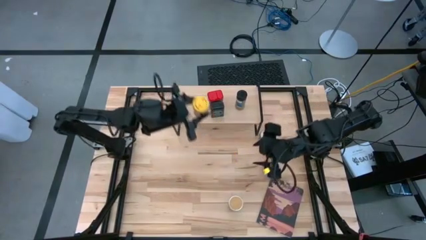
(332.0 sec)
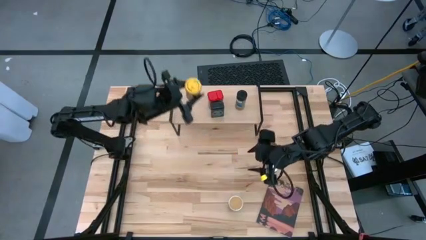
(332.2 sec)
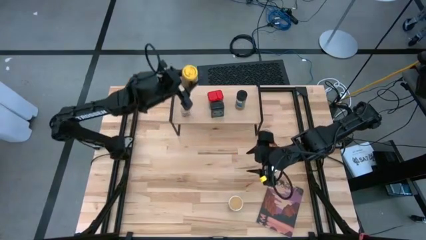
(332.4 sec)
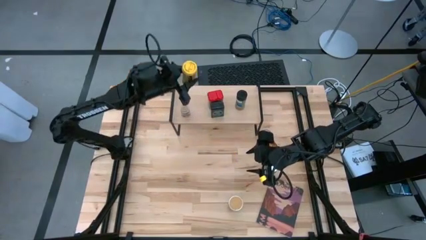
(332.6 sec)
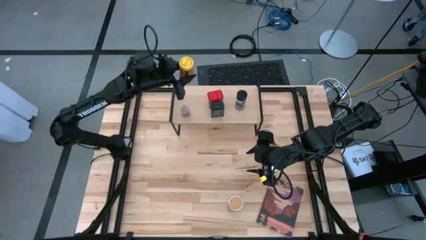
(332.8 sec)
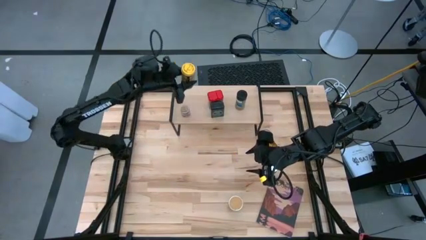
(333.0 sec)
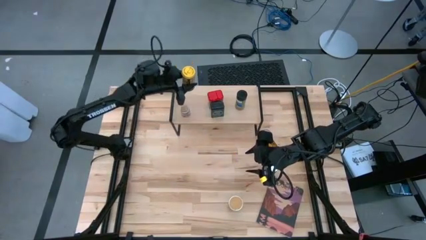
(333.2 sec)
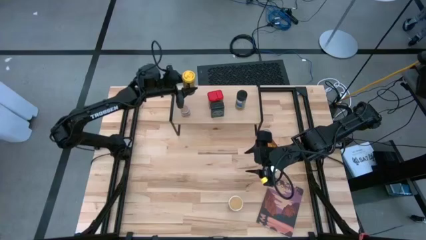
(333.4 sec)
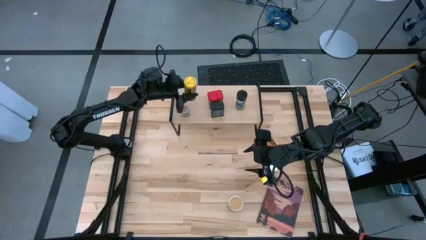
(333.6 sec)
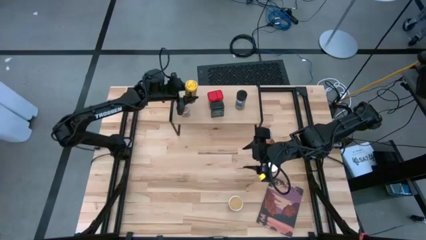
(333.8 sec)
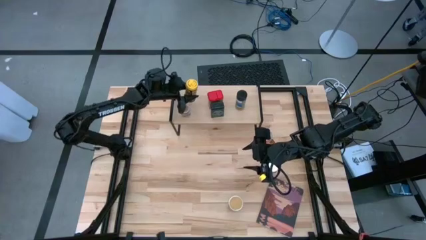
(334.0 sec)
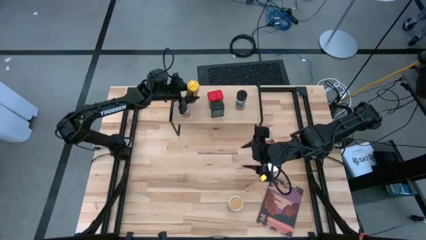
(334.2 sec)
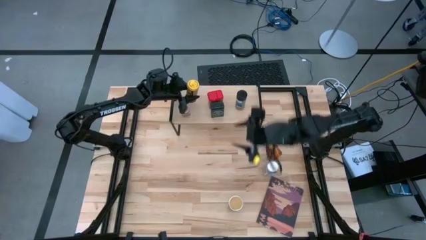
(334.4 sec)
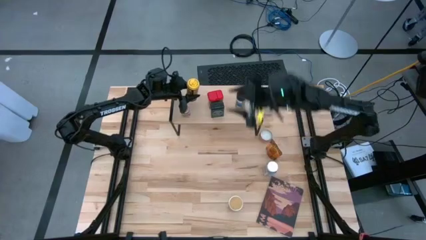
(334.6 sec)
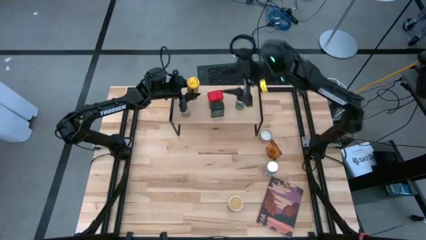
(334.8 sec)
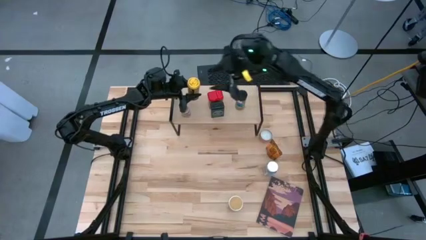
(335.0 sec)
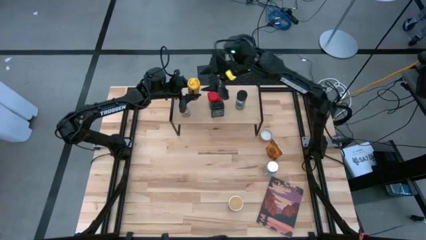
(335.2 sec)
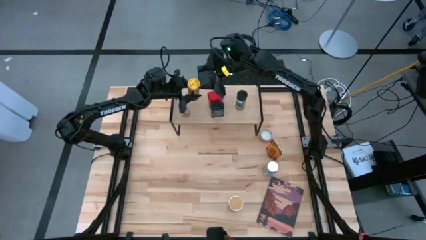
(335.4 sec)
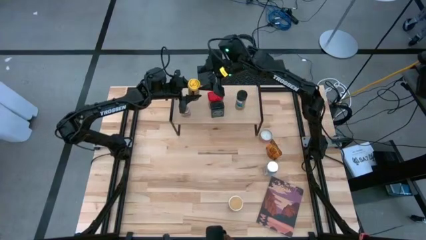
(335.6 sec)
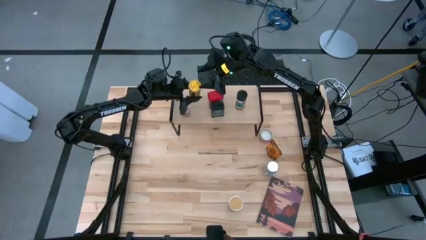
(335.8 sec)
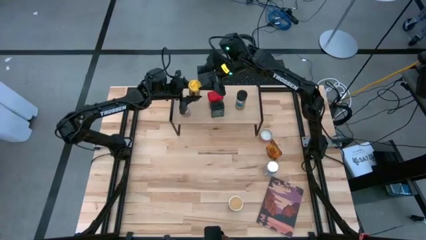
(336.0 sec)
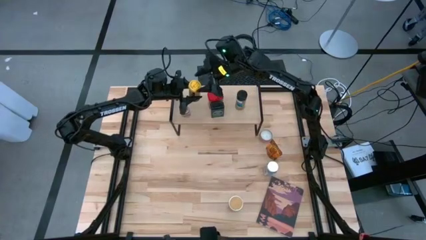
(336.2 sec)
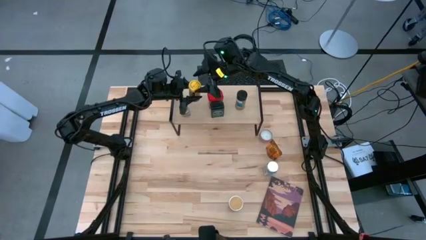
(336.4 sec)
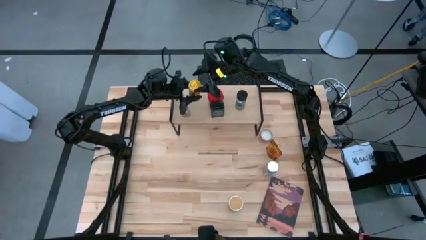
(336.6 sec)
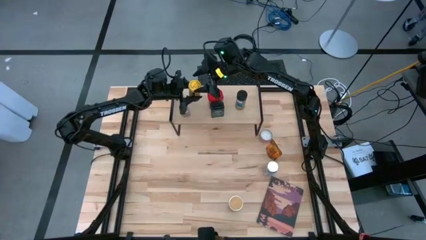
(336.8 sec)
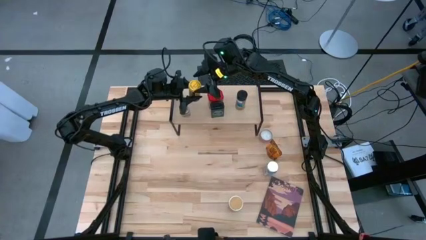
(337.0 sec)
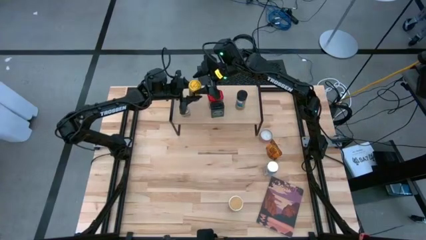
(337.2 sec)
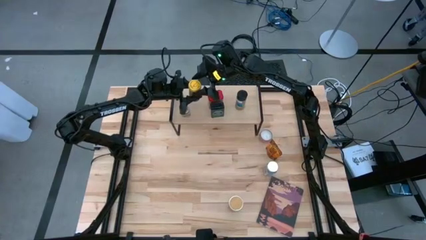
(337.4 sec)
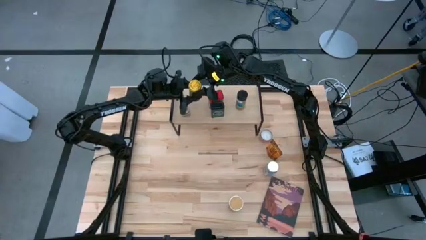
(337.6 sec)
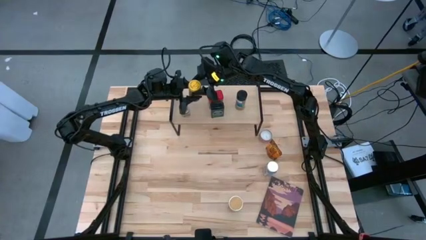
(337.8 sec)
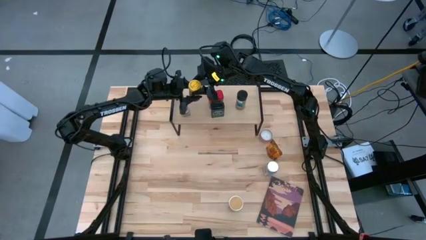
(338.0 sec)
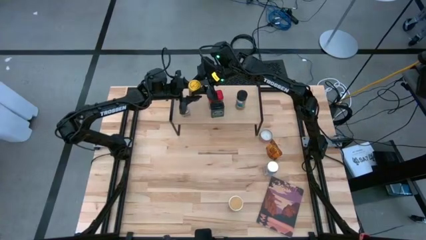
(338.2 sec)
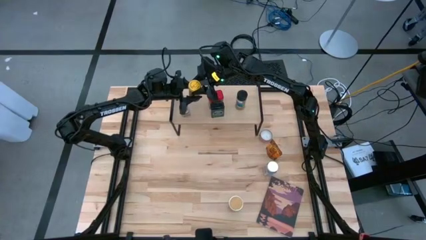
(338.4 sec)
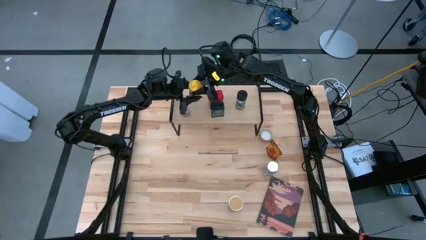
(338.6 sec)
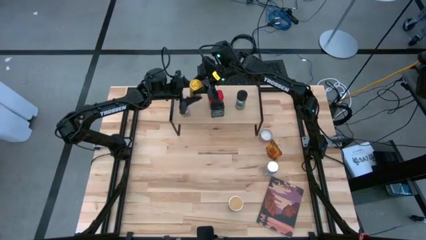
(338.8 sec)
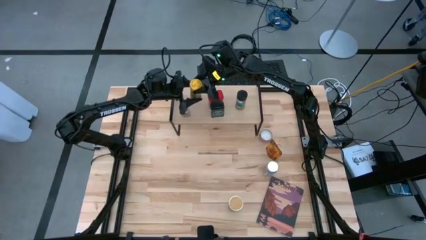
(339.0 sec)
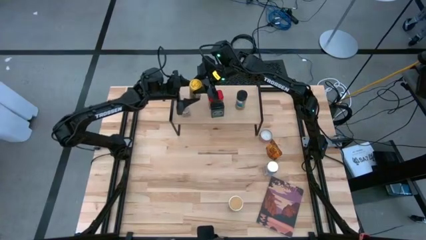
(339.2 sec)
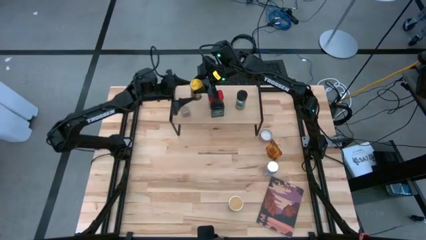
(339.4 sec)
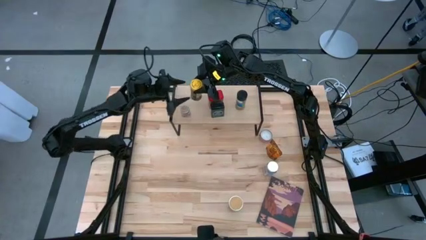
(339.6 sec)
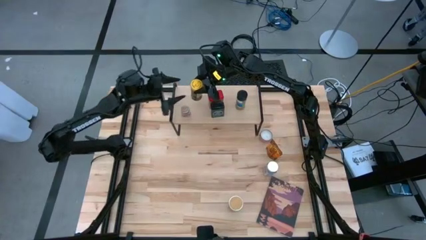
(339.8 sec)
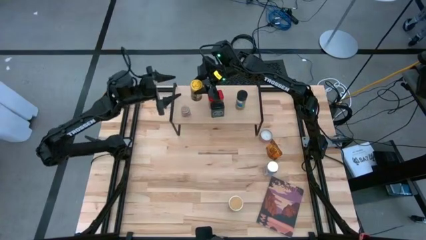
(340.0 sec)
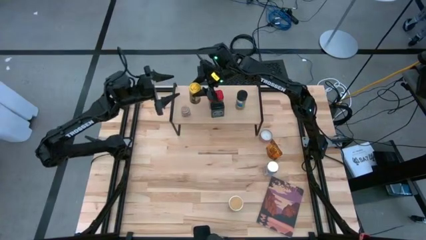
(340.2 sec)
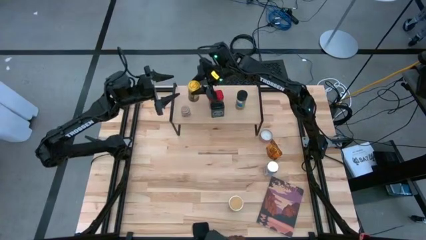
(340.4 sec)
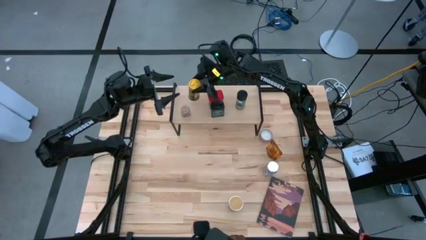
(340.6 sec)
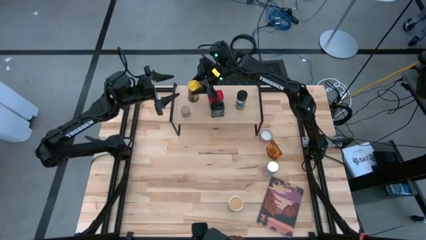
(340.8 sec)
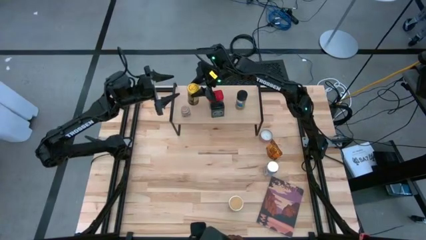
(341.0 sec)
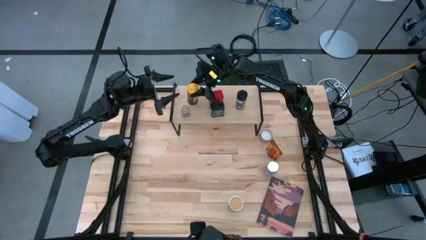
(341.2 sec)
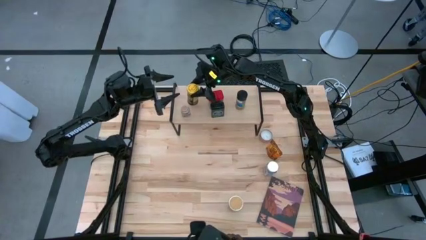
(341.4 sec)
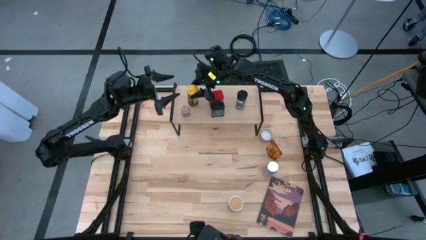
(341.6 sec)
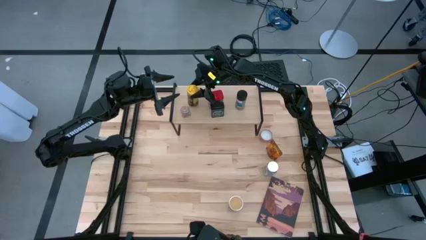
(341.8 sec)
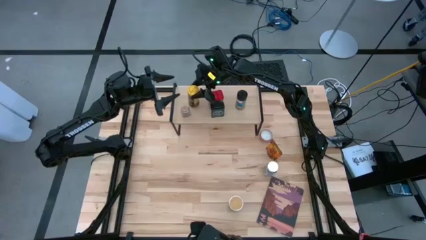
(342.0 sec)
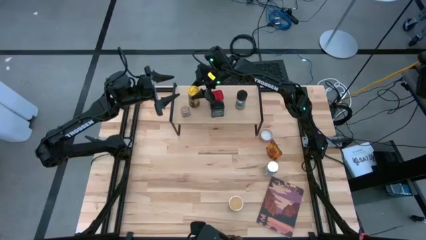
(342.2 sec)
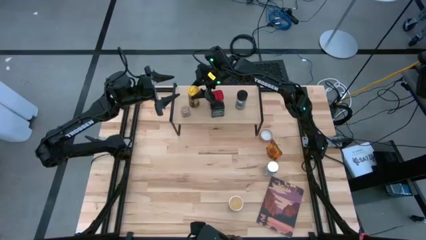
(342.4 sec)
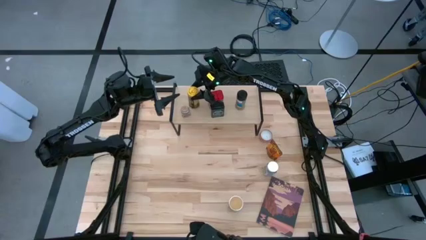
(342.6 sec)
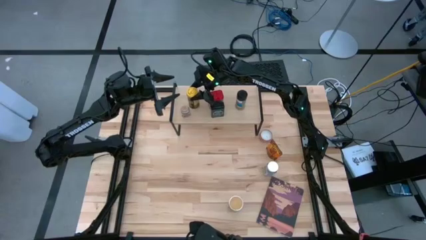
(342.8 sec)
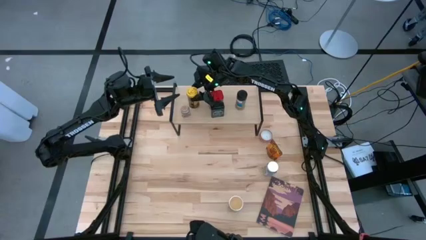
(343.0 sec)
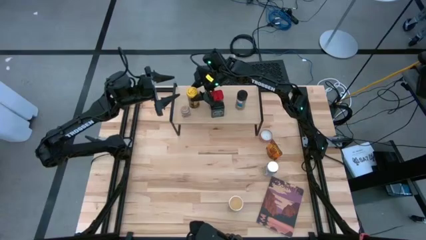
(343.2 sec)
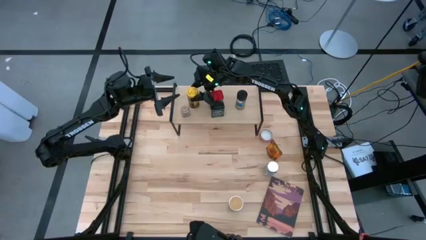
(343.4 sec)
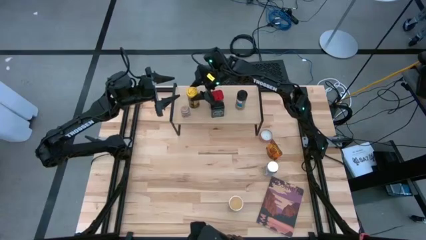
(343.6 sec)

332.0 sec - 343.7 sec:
Task: Shelf spices
Put the yellow spice bottle on the shelf

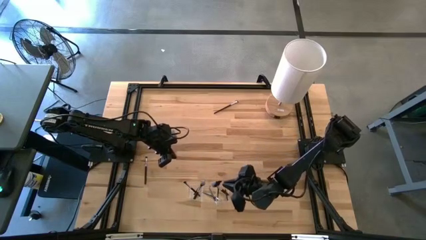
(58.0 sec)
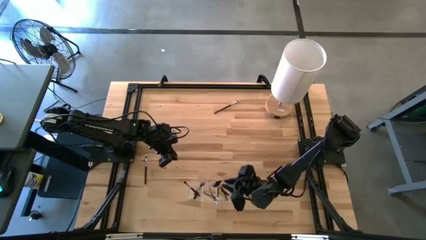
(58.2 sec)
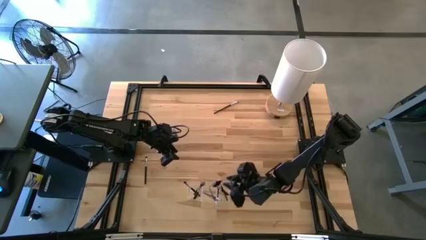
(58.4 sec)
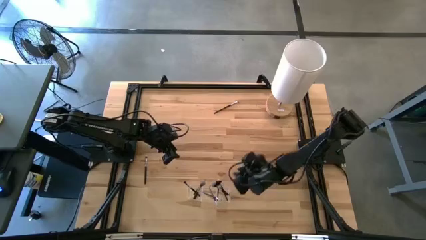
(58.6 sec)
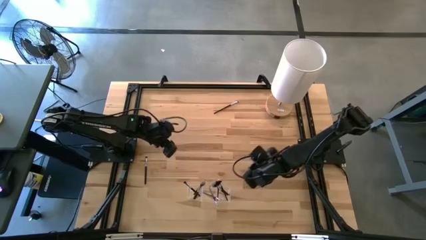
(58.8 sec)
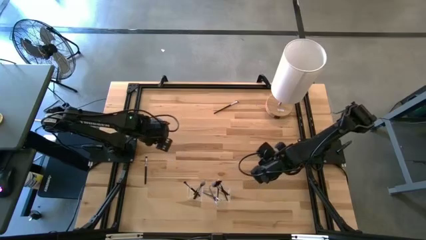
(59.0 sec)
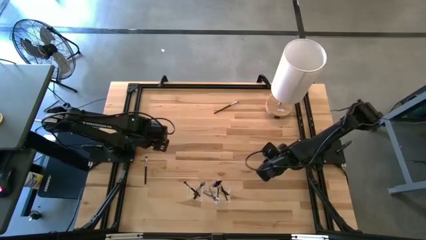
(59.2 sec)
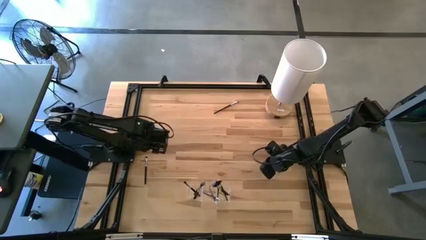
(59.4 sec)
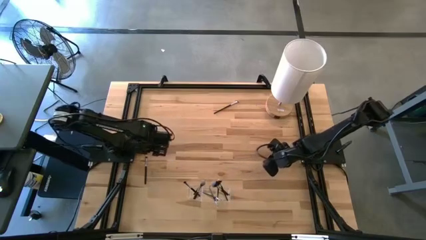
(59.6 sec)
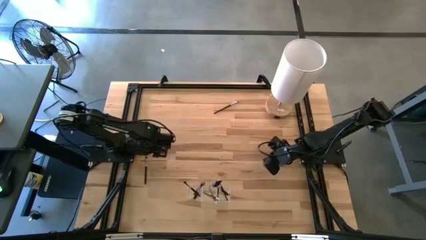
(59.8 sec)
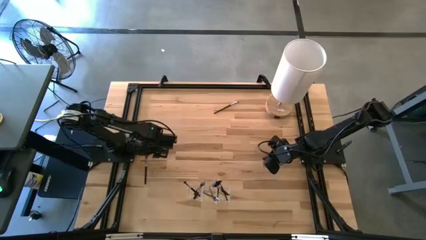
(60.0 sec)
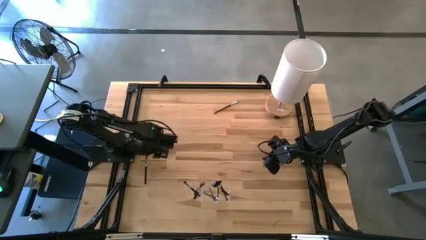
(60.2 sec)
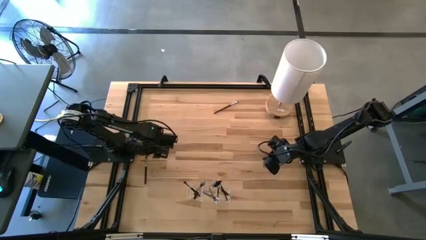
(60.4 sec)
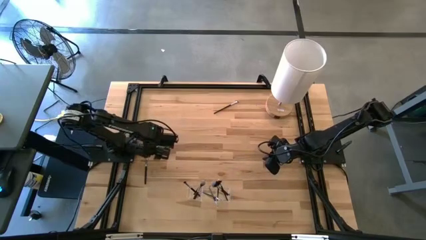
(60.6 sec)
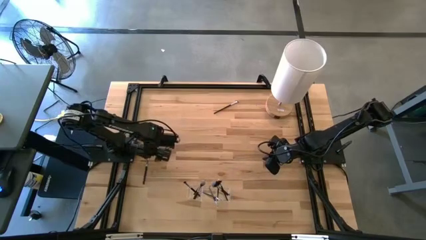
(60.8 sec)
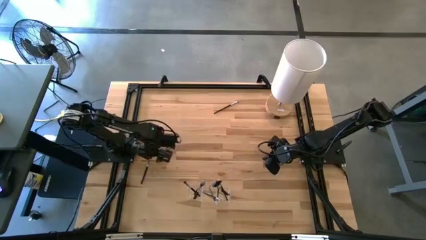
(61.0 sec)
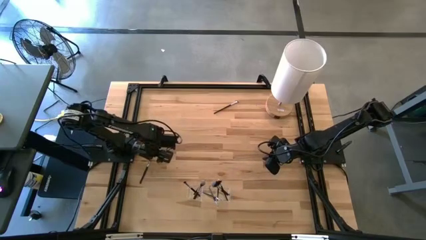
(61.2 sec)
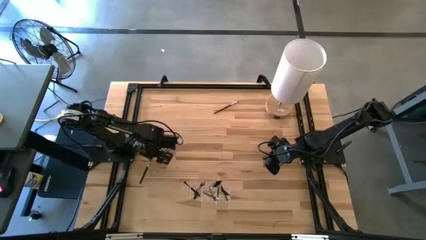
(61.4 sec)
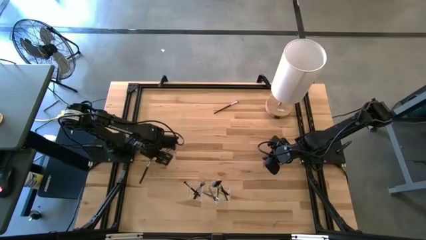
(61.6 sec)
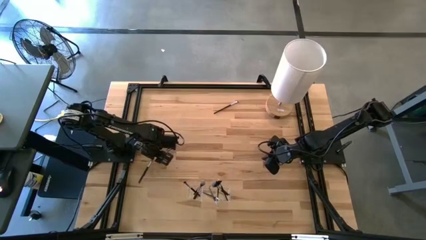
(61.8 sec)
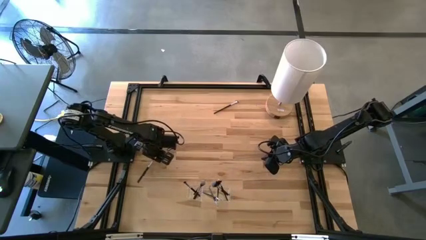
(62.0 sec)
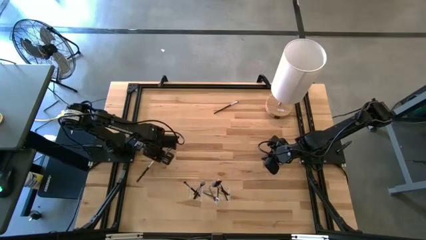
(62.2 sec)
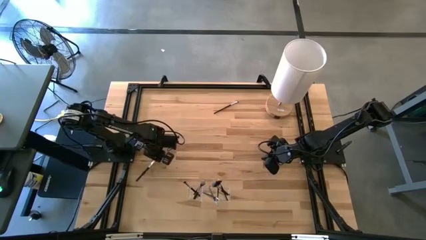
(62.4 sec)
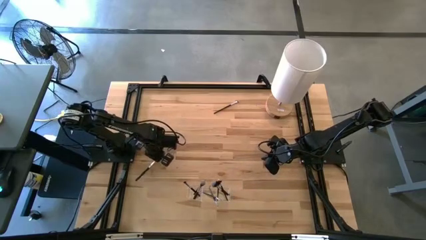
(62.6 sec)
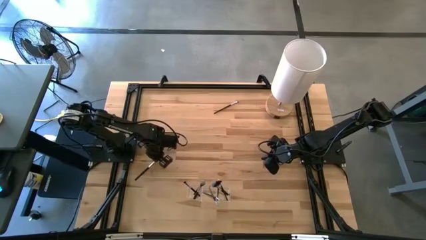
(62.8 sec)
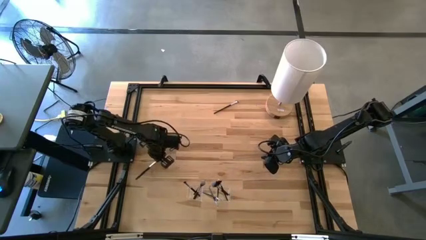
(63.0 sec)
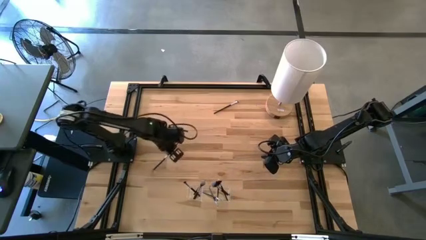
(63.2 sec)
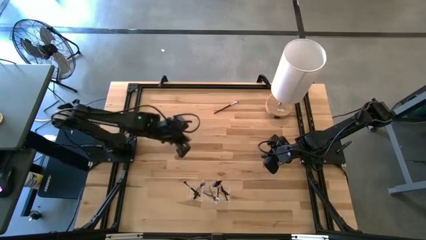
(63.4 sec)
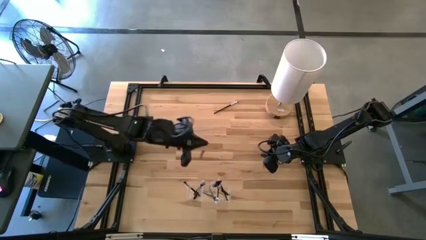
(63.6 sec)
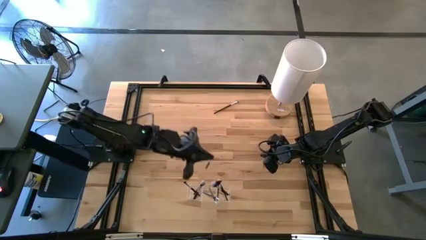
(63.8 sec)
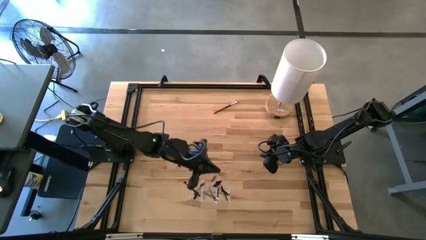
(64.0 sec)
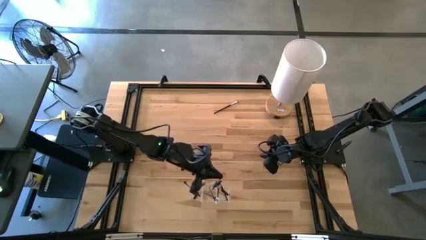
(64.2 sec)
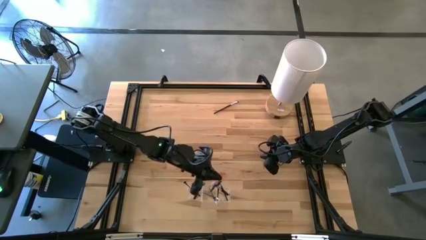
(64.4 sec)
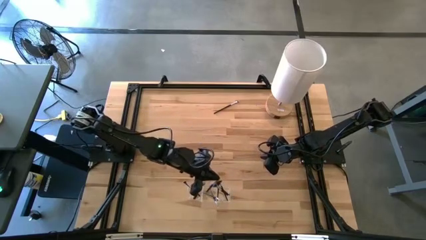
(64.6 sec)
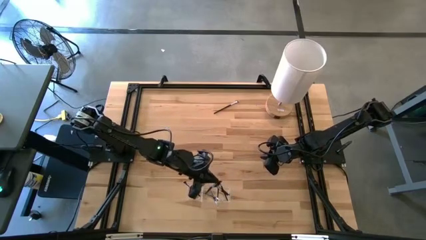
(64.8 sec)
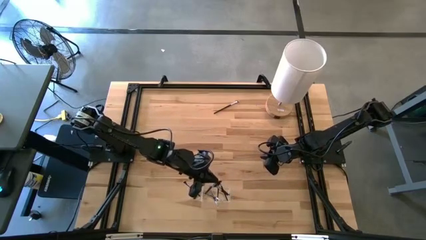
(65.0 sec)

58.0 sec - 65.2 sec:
Task: Put items in baskets/containers
Put the black eyeshadow brush into the transparent organizer
